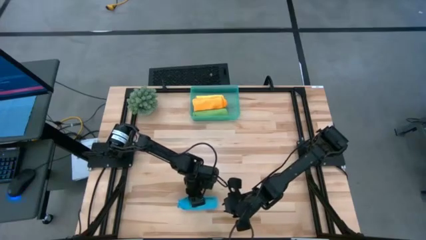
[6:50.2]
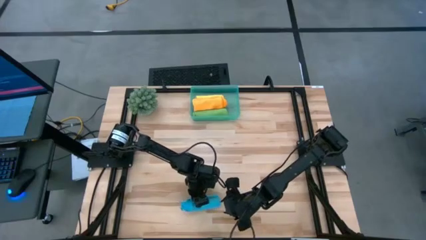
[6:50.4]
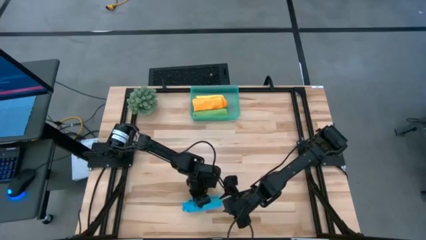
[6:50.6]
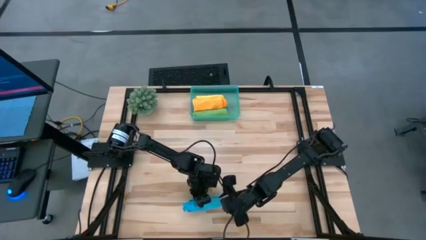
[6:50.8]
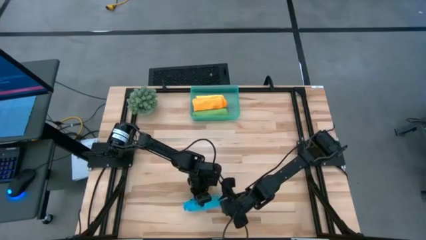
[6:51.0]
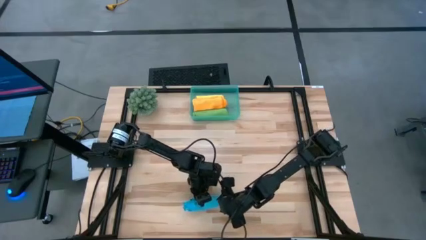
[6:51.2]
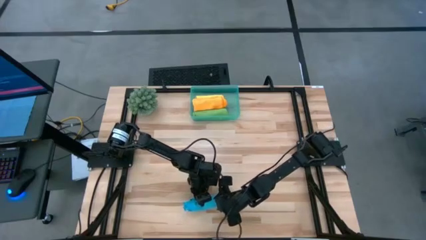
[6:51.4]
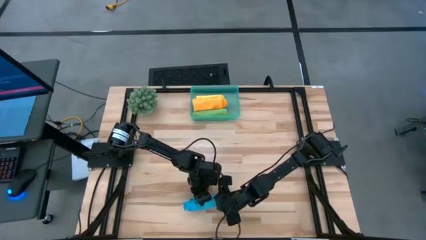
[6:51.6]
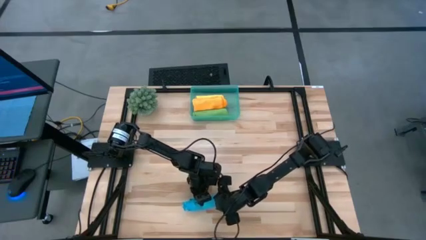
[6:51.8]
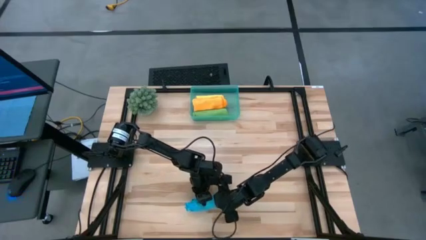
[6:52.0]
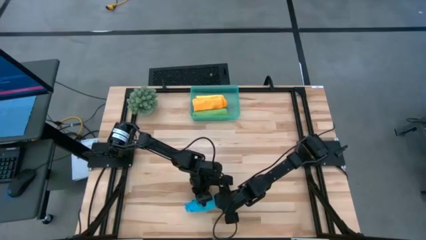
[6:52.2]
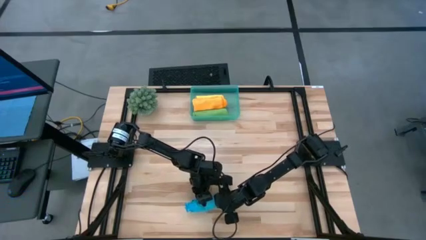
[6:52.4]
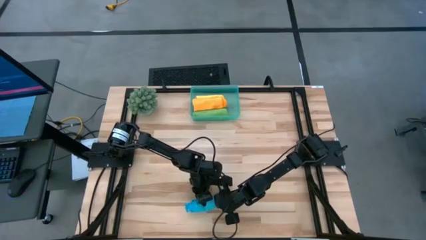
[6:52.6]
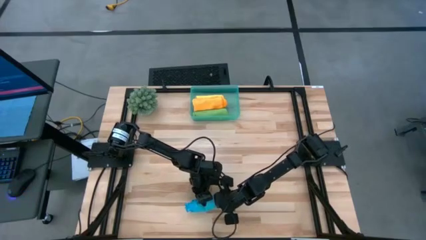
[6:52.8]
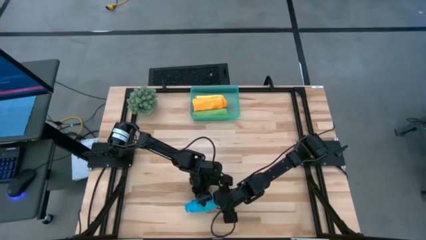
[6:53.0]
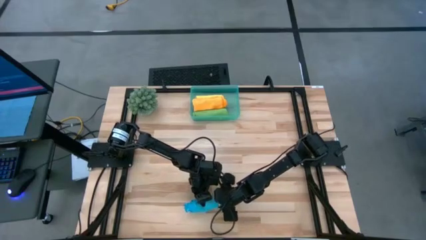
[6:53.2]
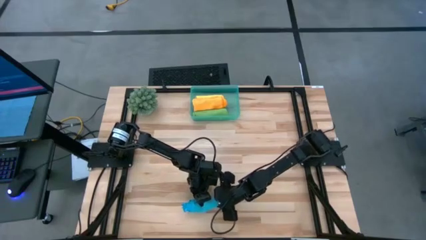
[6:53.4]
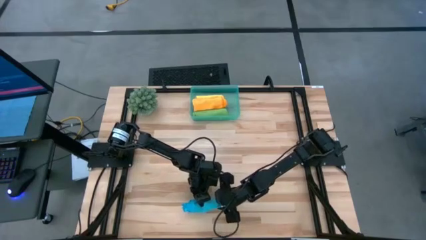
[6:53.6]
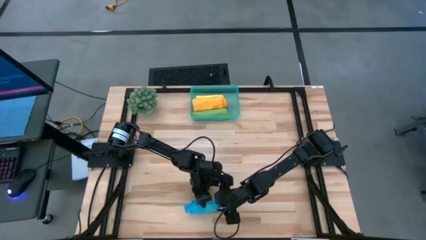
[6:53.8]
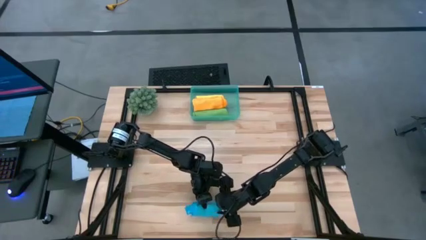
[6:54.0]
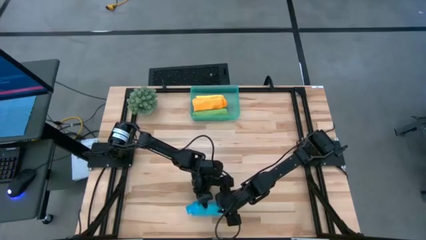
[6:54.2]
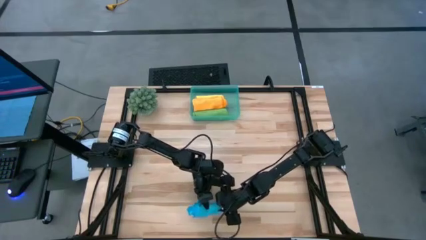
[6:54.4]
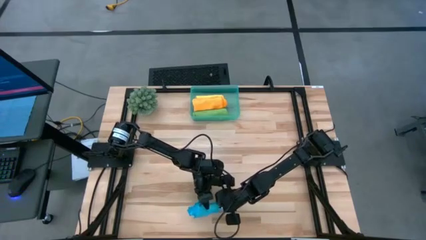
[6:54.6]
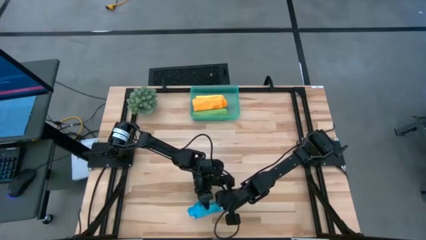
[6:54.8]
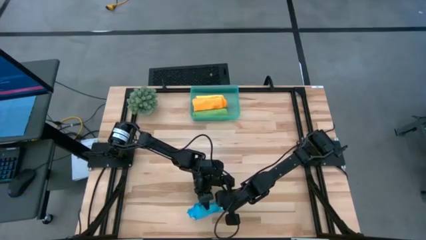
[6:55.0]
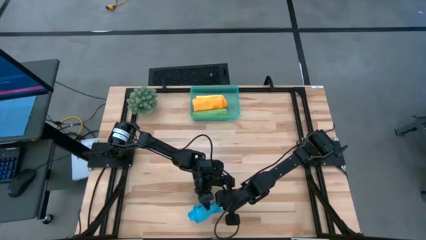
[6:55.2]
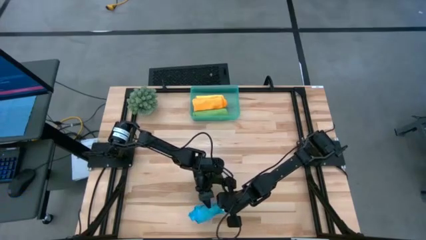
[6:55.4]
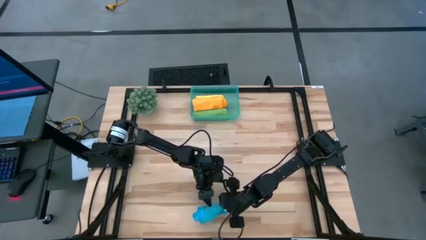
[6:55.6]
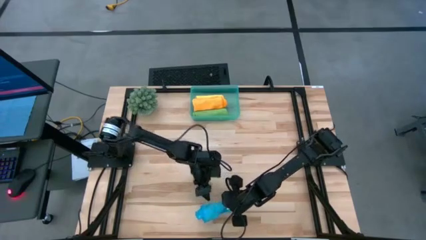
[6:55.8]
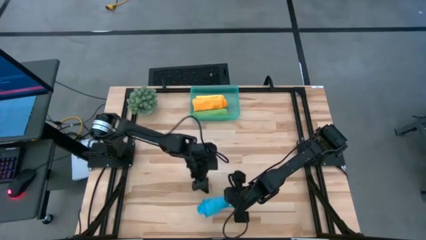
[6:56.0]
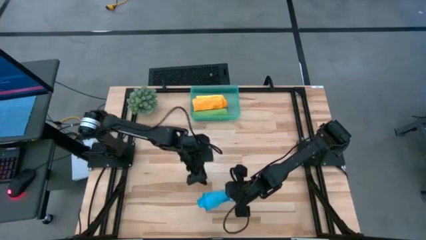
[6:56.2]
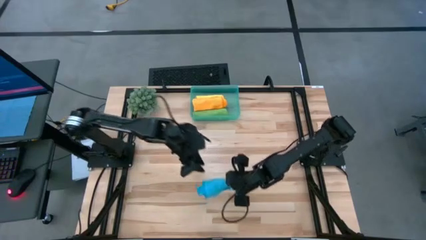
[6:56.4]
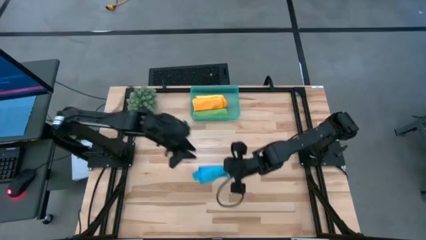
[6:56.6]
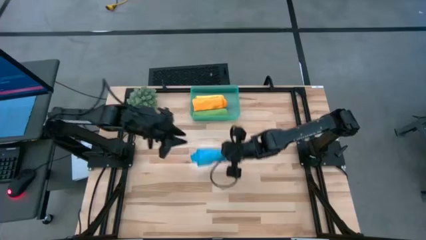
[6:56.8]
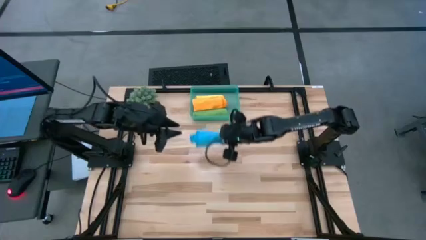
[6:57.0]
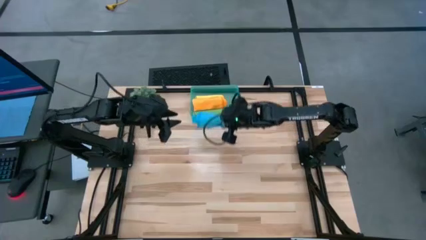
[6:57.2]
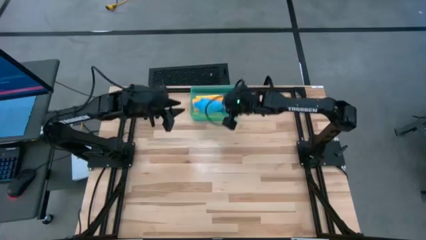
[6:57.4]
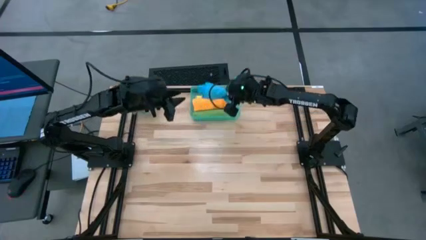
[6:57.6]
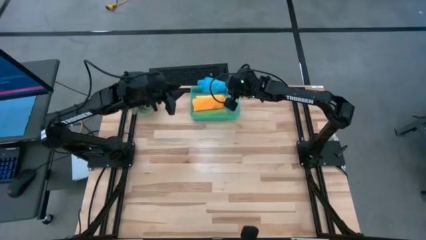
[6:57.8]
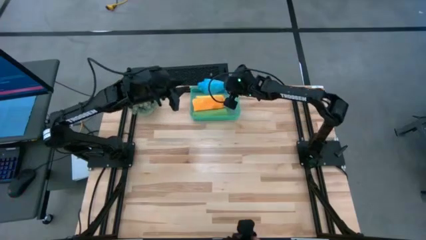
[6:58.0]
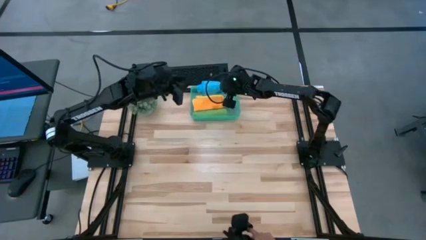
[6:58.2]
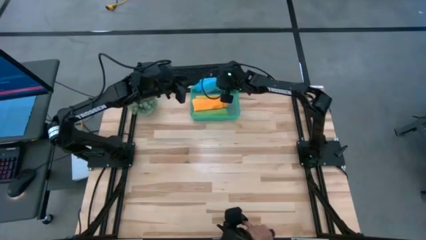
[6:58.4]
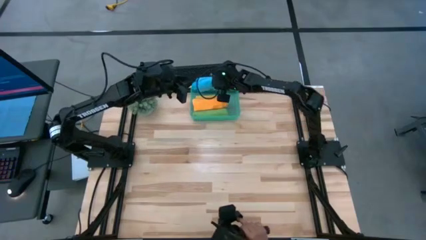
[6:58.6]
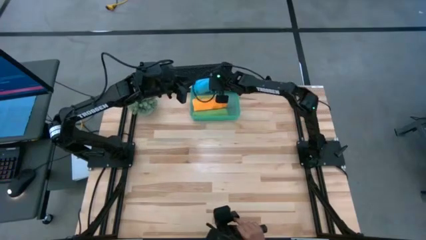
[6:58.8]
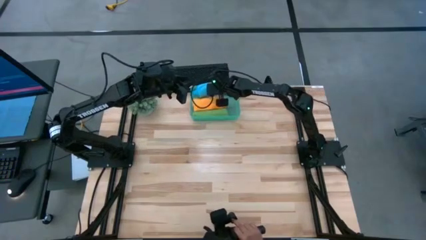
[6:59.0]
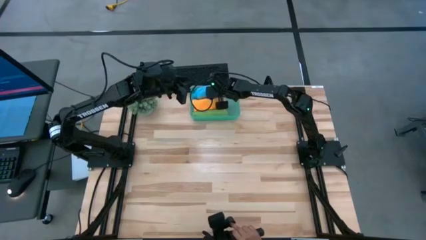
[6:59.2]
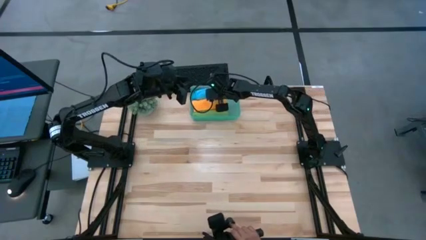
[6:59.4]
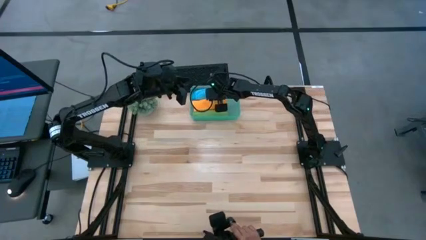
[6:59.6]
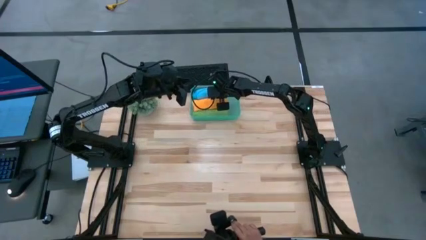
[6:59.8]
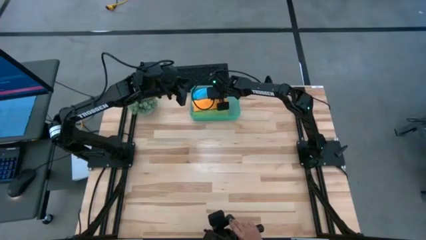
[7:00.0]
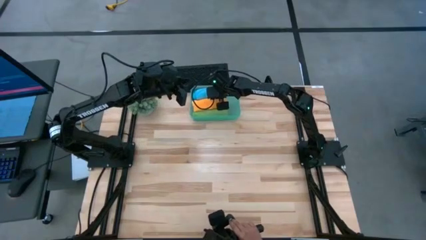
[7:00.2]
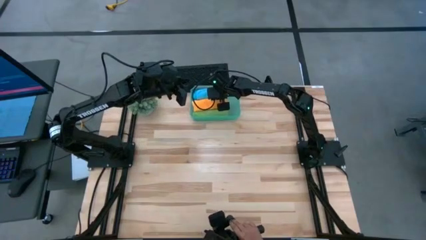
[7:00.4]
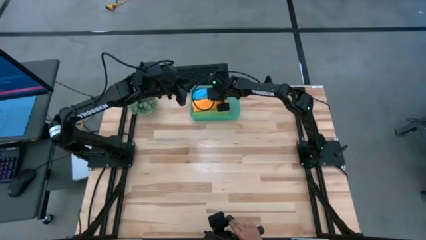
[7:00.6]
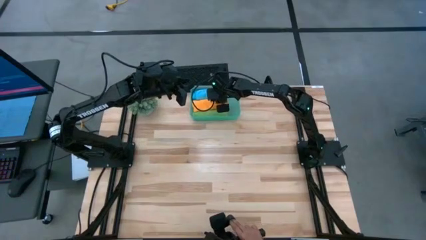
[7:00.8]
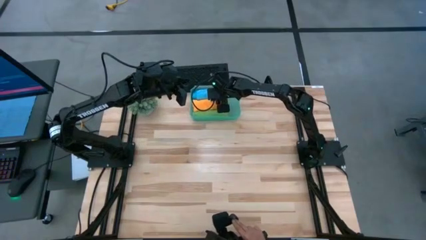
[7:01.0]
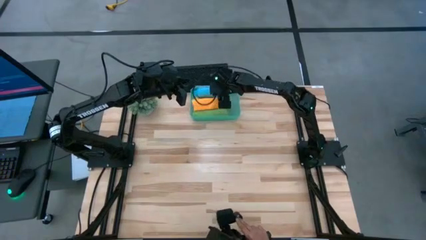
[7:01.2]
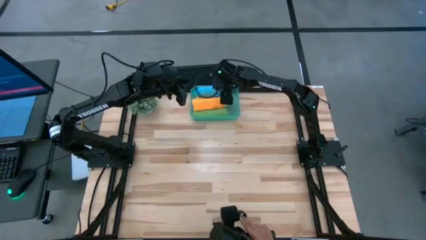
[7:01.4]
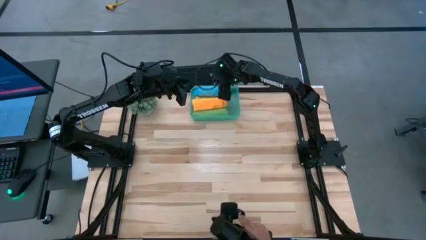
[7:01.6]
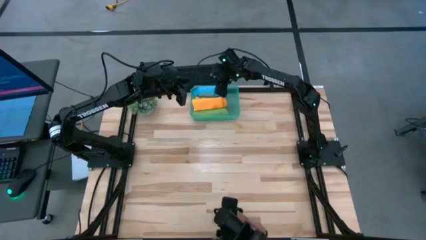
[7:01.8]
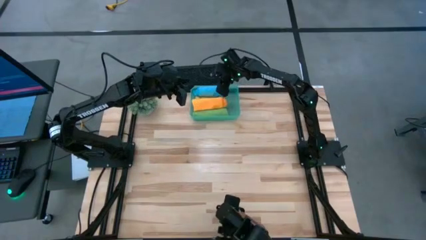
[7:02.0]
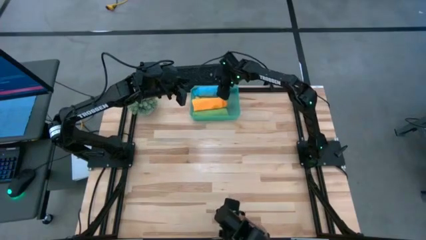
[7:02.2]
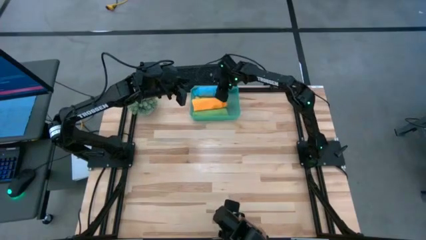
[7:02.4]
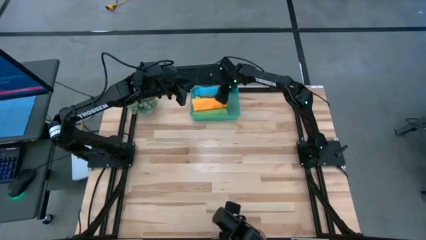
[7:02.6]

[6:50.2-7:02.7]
Task: Roll microfiber towels into tight, uniform cylinder then place into a basket
Put the rolled blue towel into the blue bin

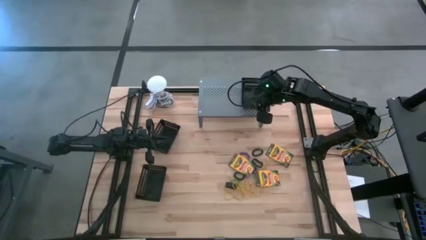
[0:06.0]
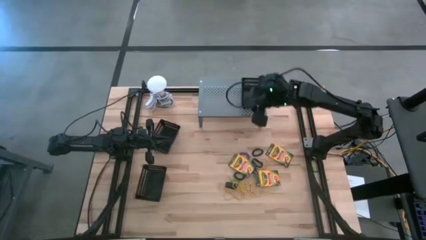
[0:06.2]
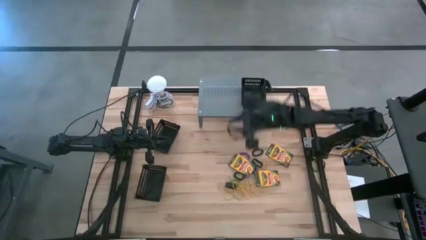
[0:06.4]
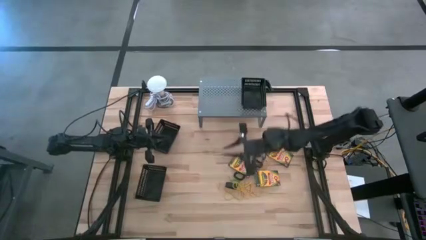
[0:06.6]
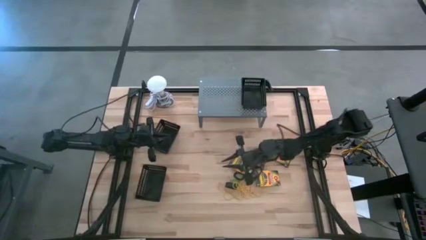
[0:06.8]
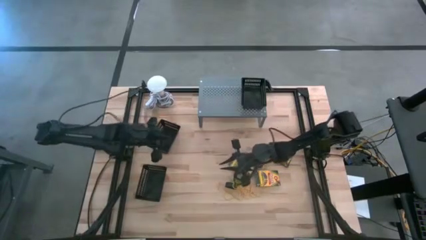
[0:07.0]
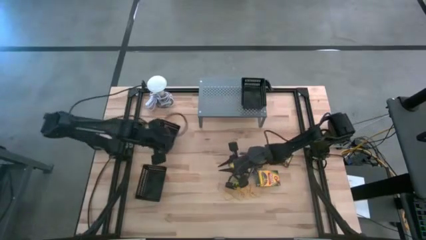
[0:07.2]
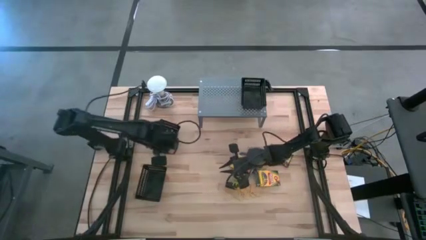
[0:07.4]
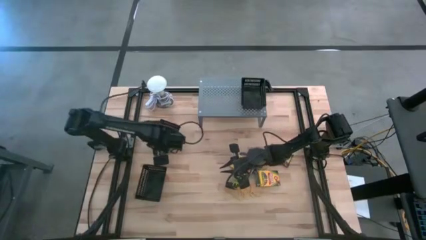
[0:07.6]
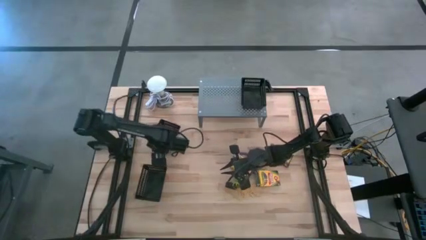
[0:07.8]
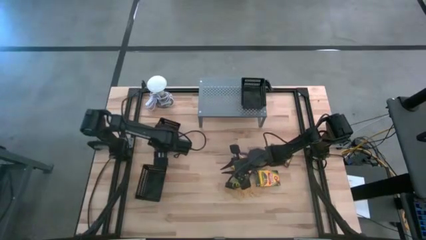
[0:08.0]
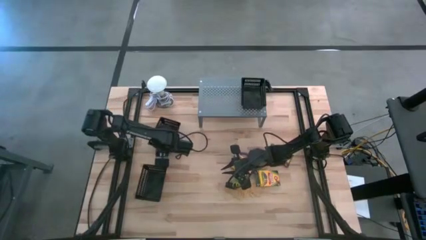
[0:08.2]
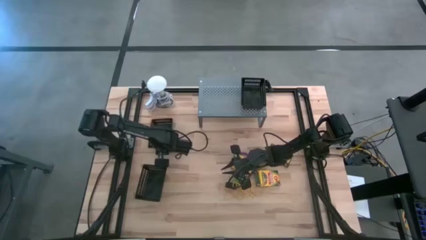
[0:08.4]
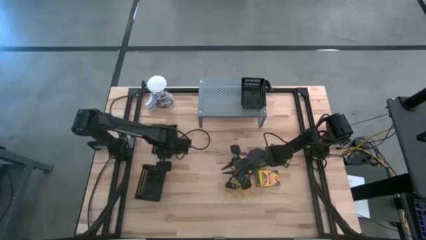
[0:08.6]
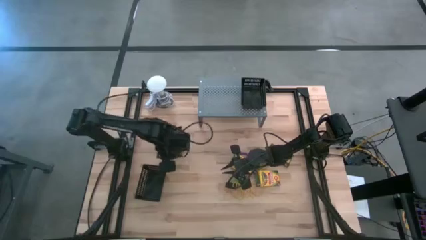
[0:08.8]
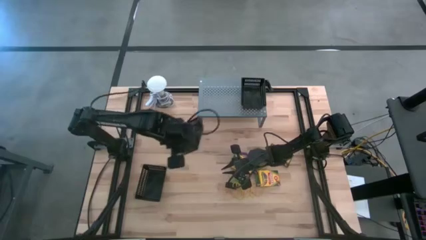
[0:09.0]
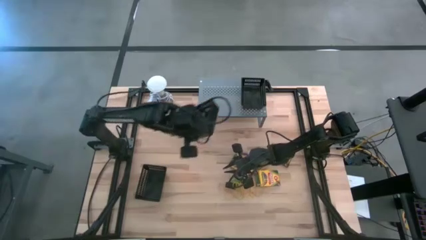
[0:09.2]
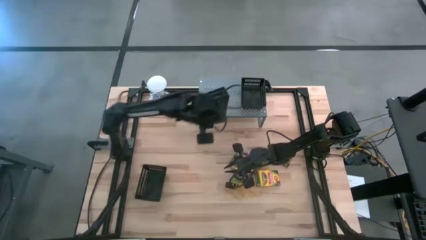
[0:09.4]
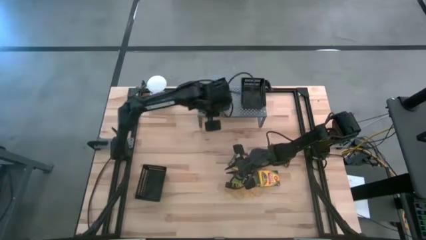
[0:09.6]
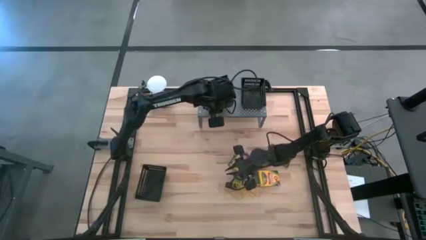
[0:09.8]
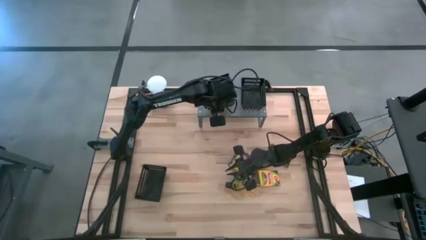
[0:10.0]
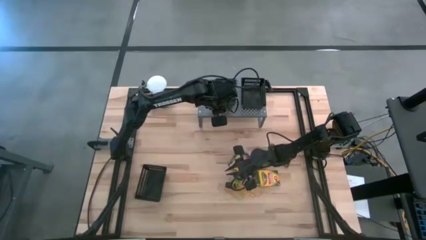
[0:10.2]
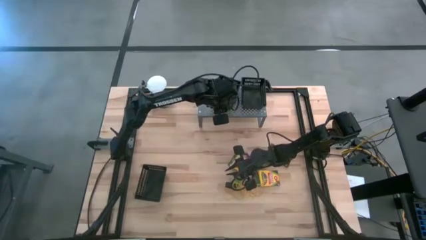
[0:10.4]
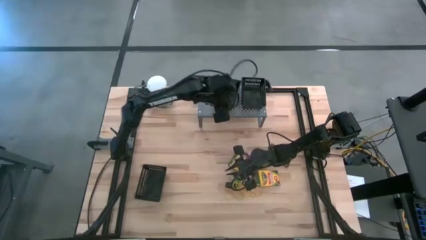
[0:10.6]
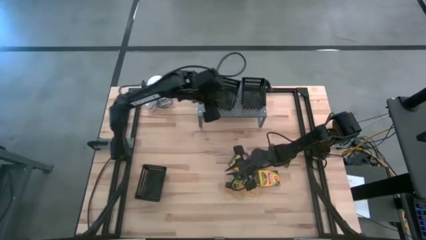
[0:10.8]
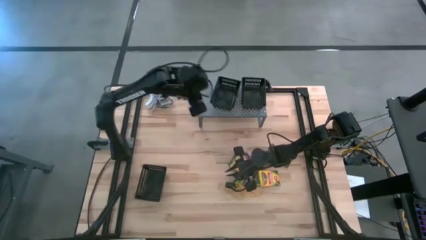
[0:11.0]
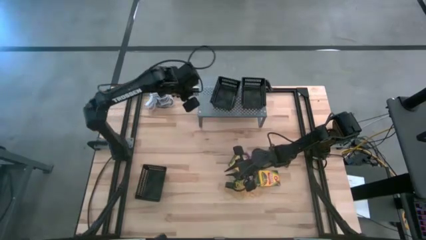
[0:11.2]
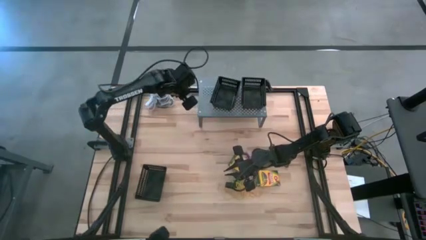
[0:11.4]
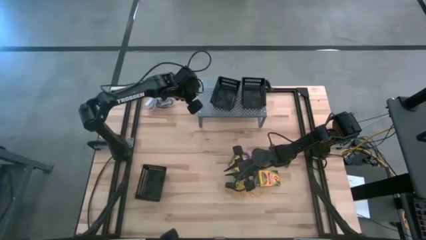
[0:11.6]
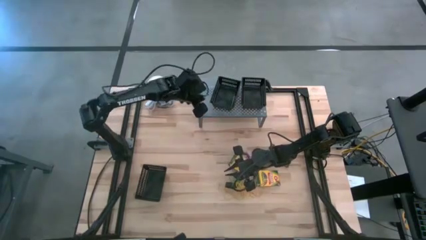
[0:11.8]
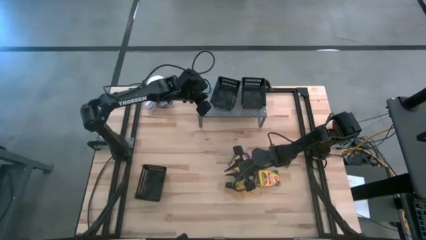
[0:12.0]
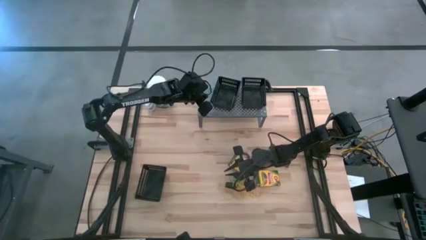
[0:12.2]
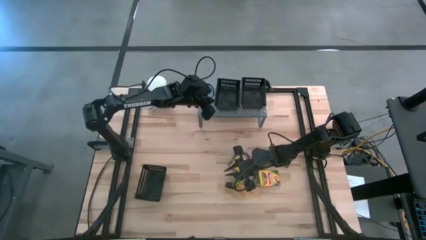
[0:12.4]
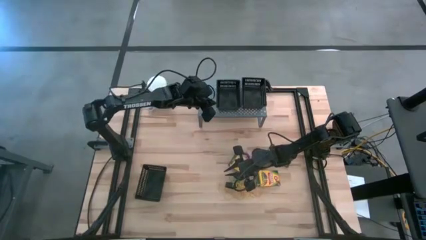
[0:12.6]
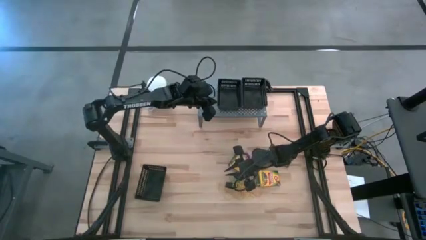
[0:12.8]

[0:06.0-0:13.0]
Task: Pick & Place Office Desk Supplies
Put the top black bin on the shelf
